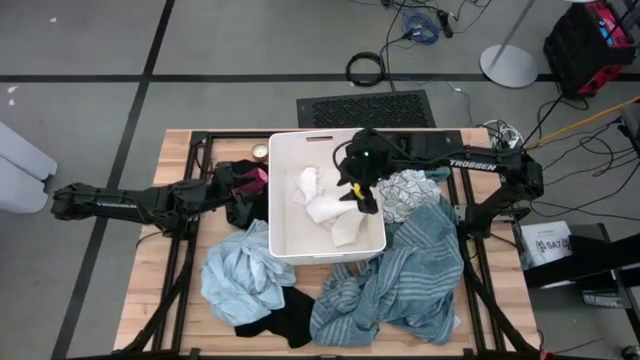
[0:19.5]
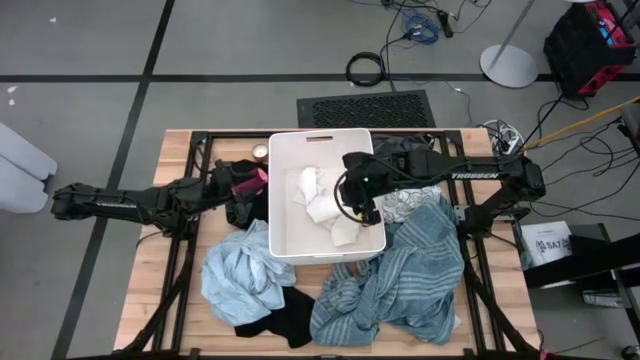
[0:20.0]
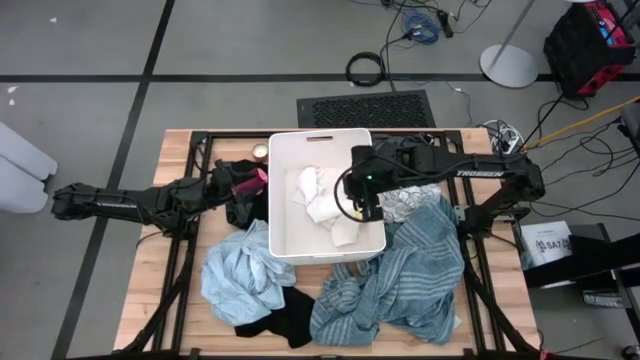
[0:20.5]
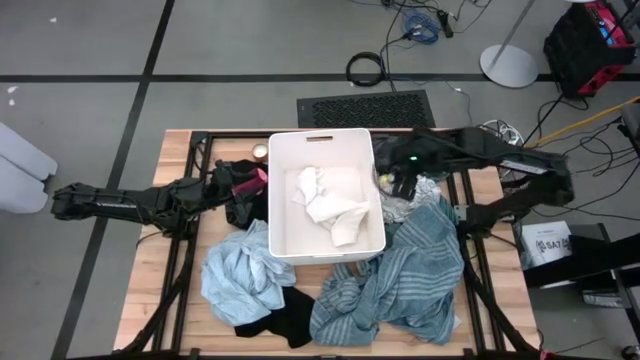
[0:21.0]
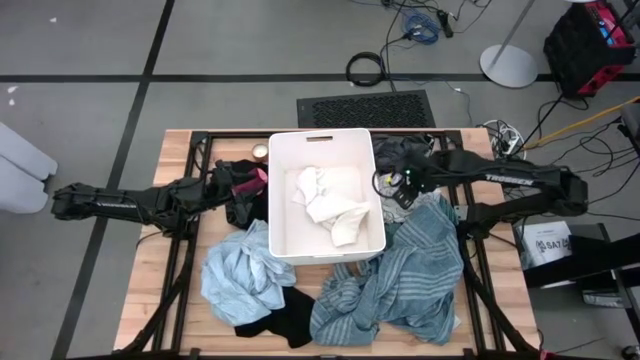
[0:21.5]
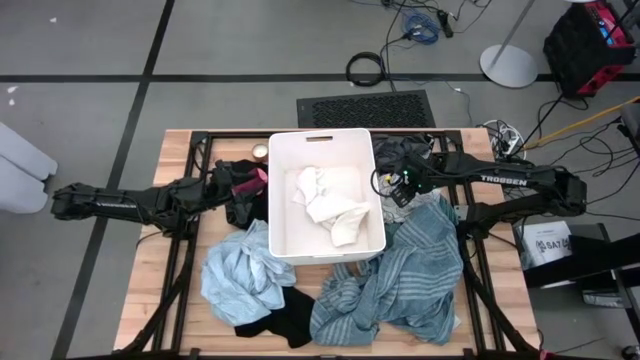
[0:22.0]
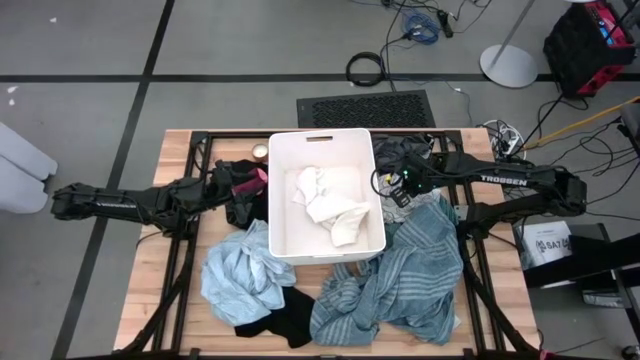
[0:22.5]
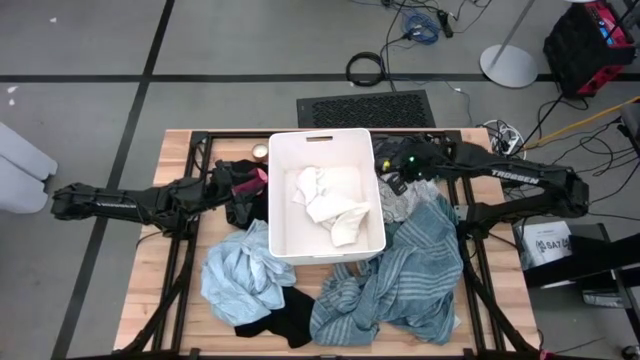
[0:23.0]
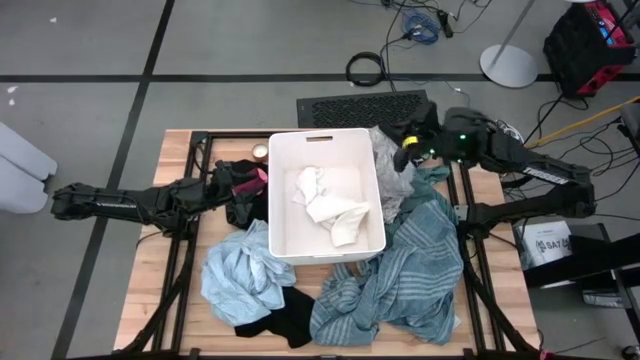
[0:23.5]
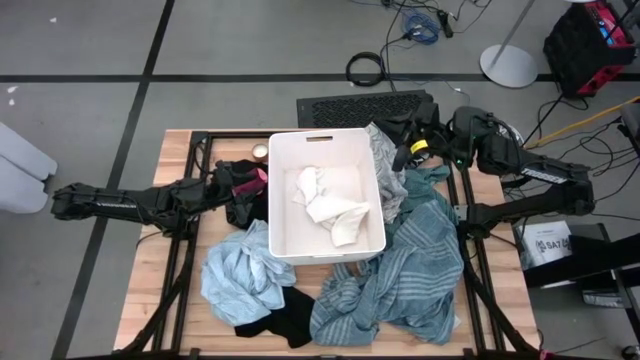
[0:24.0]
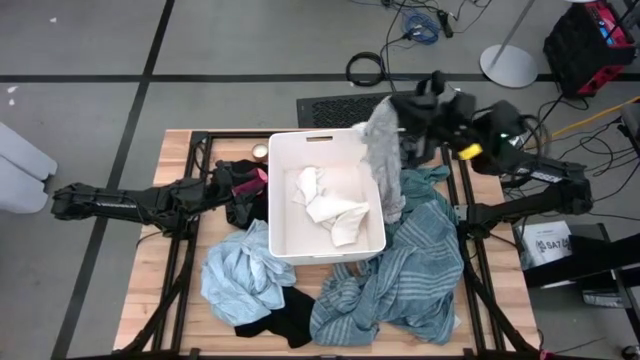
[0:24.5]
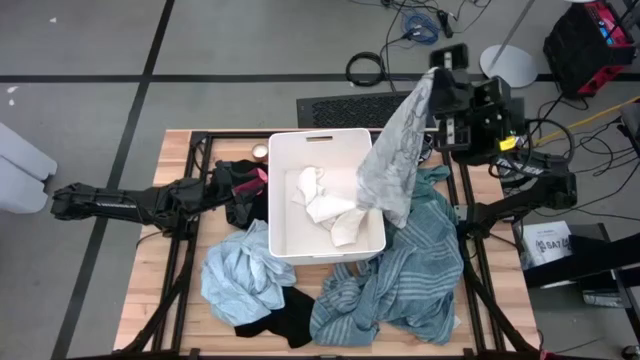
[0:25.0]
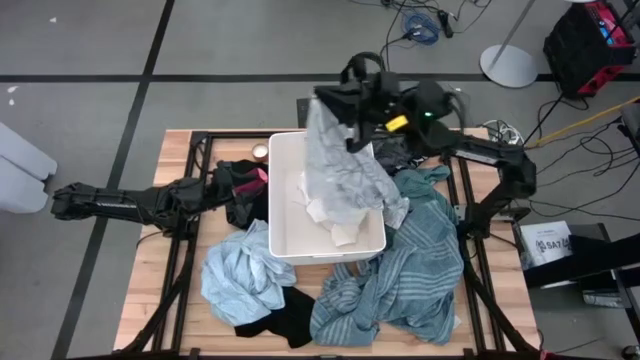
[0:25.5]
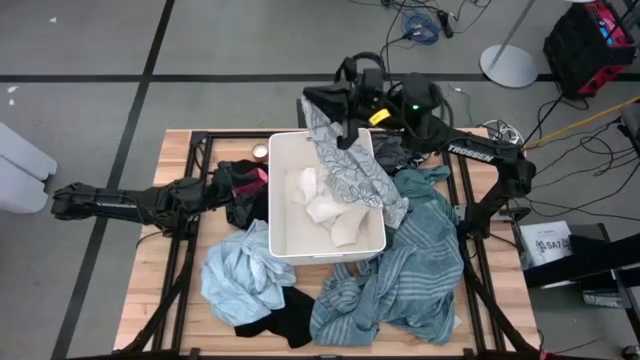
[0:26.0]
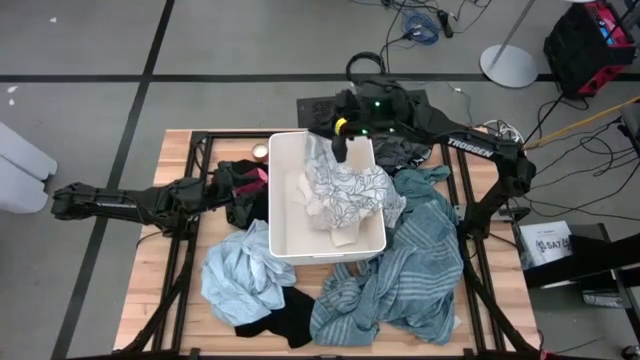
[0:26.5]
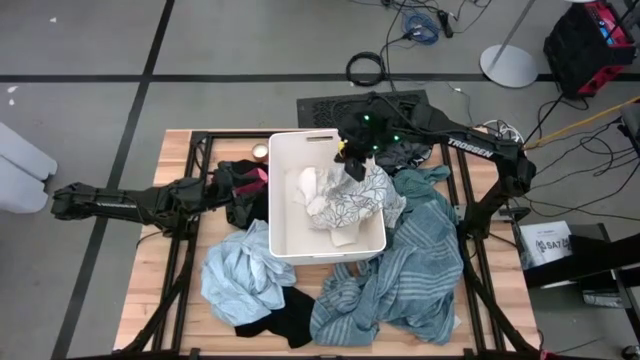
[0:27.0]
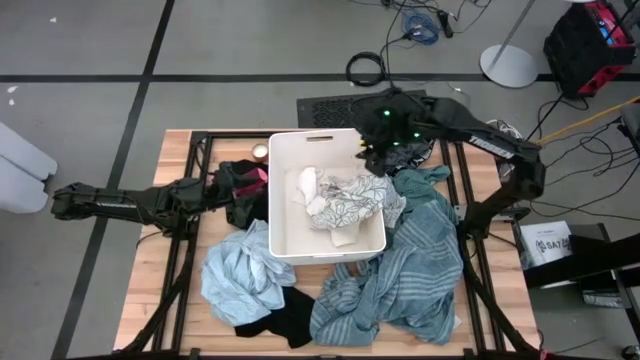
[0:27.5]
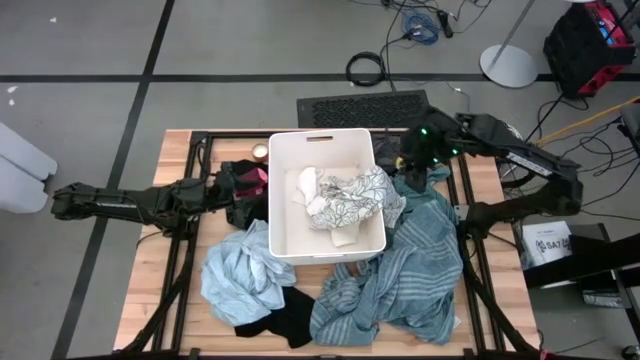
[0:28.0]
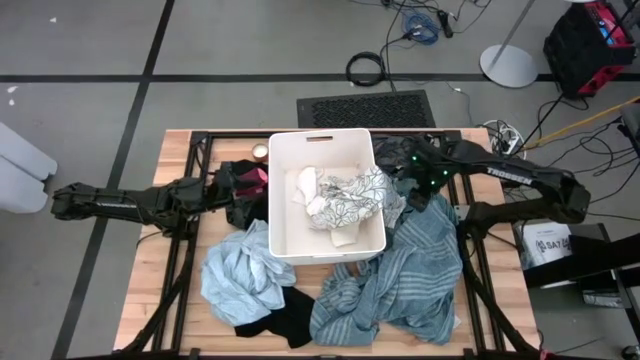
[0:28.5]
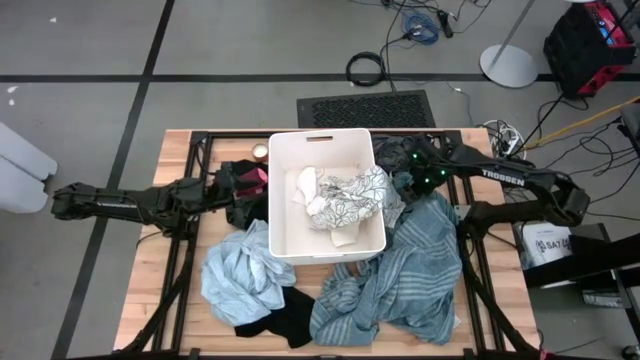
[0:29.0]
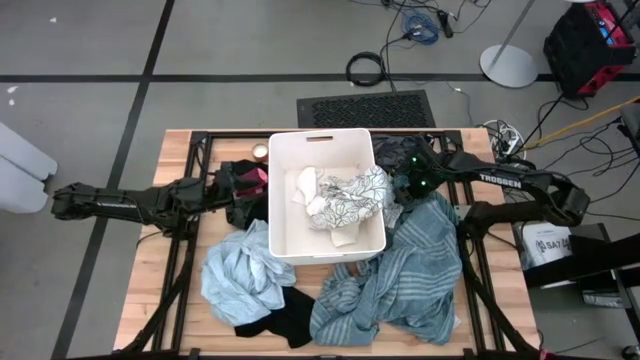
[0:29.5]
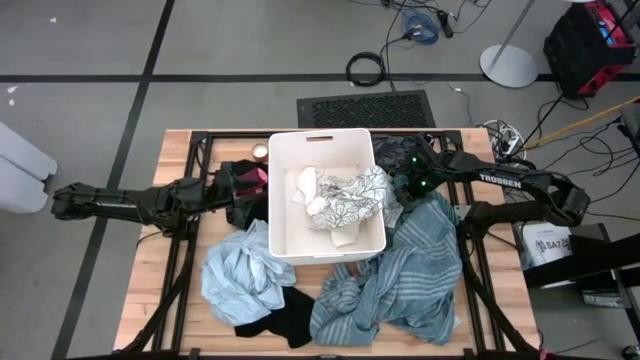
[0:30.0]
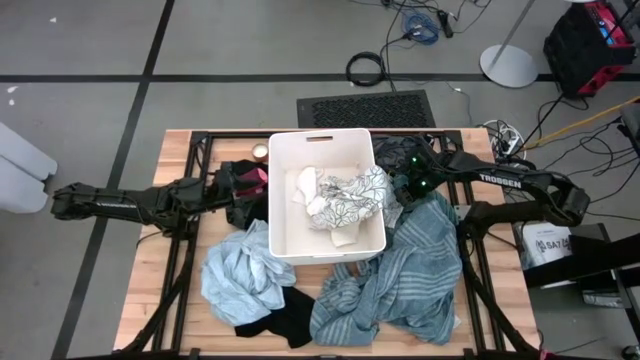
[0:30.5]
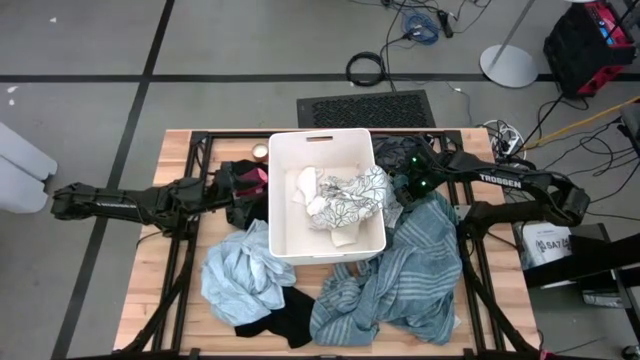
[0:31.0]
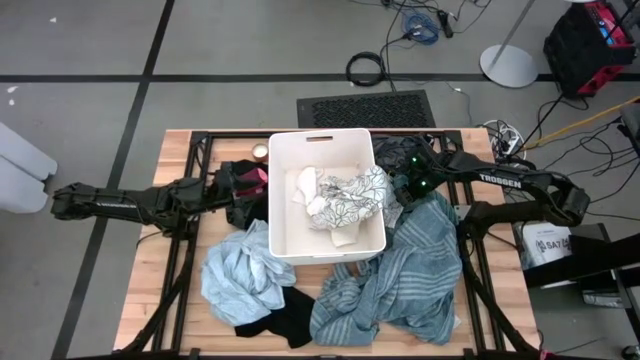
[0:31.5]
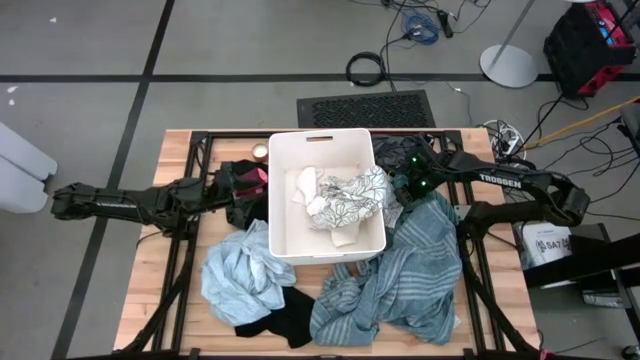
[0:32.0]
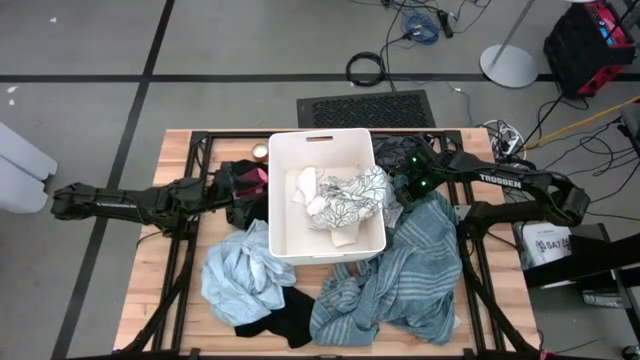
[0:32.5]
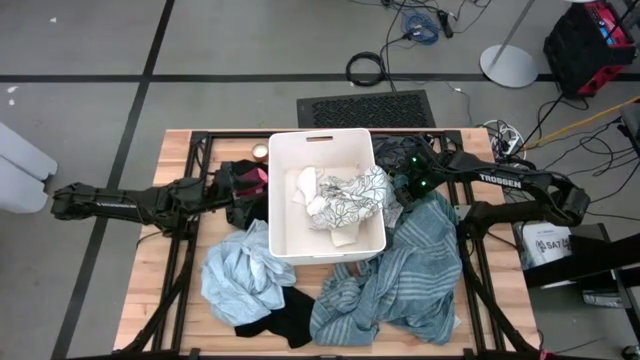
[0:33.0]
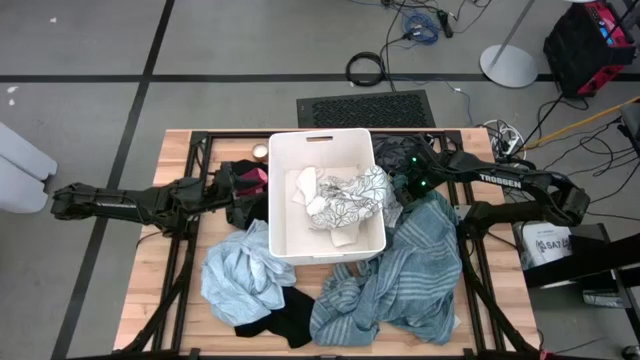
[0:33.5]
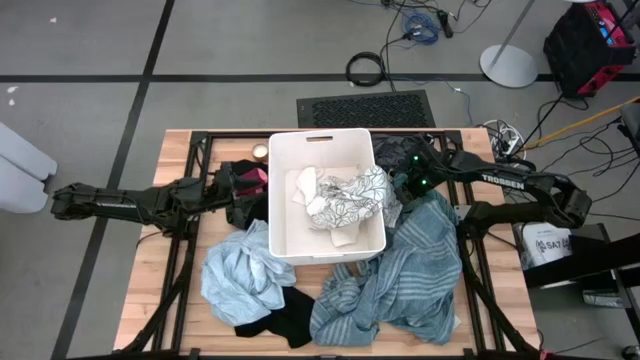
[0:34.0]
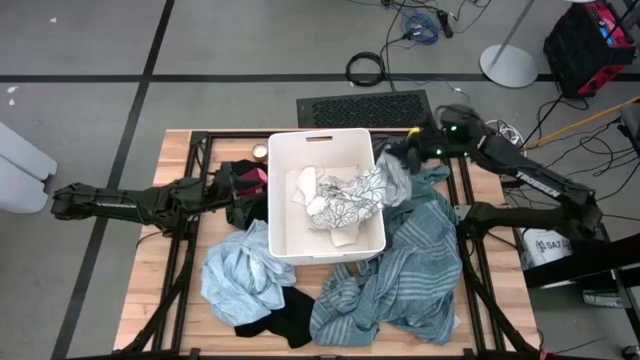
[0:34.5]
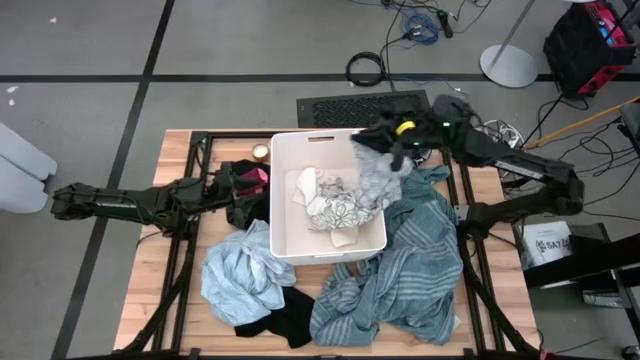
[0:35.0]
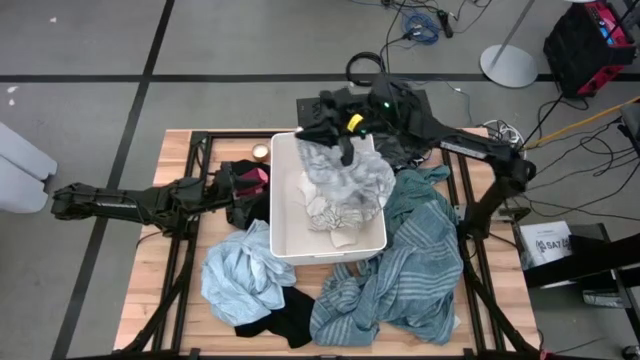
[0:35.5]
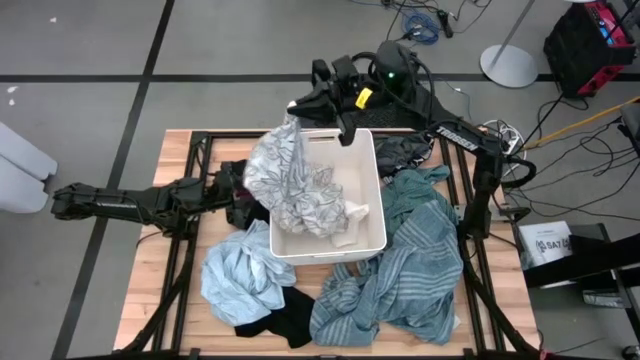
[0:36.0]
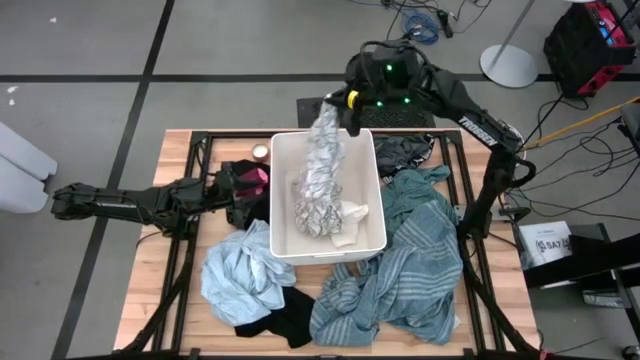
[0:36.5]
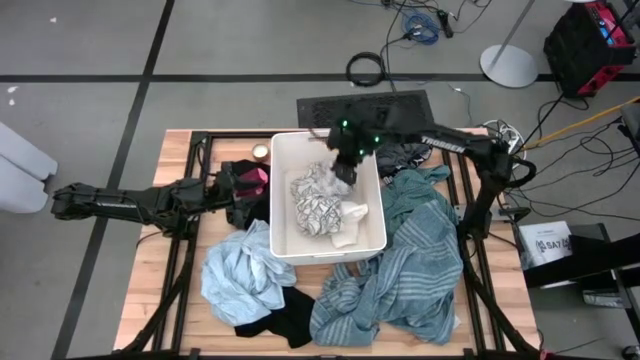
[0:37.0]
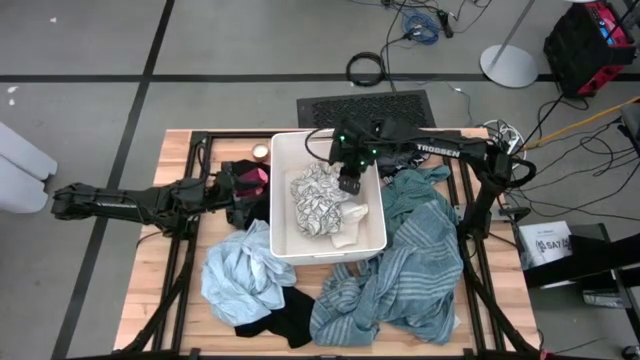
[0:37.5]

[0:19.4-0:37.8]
Task: Sort clothes
Put the white patterned shirt into the laundry bin
